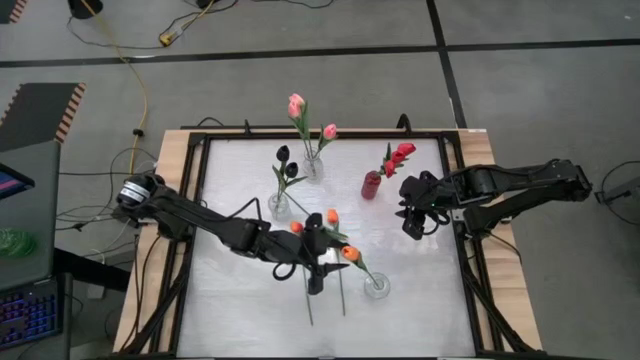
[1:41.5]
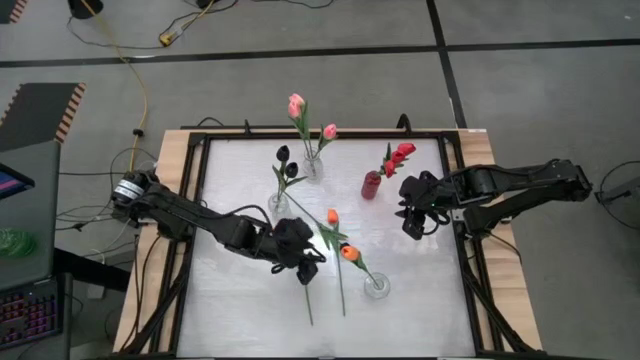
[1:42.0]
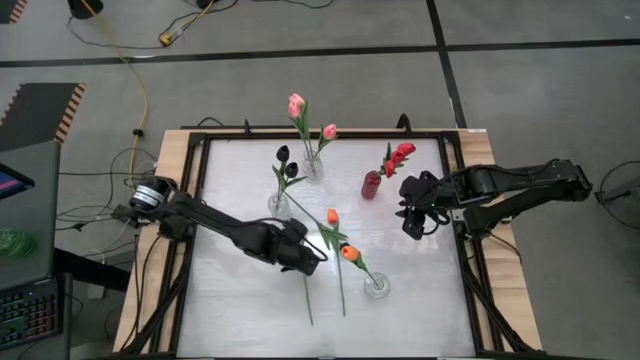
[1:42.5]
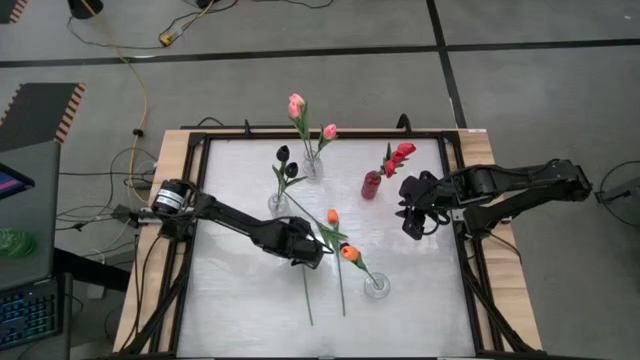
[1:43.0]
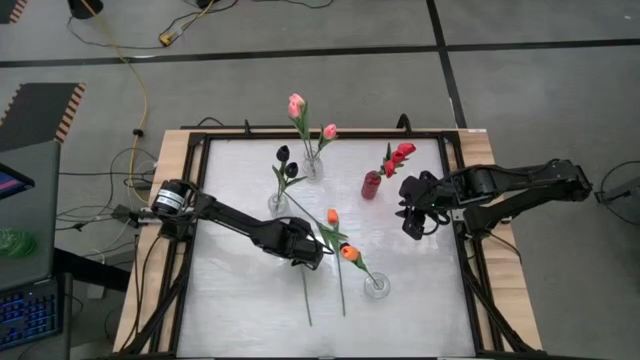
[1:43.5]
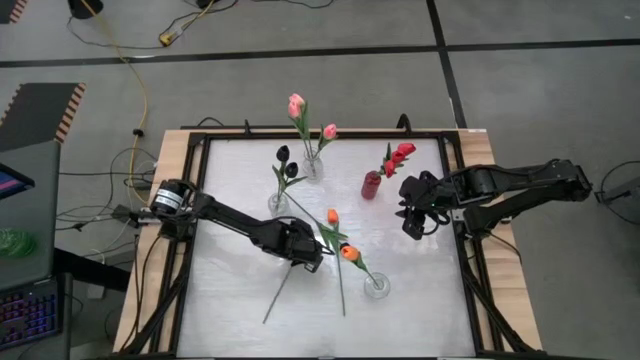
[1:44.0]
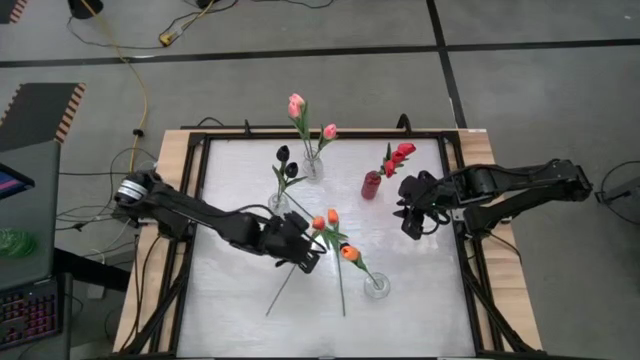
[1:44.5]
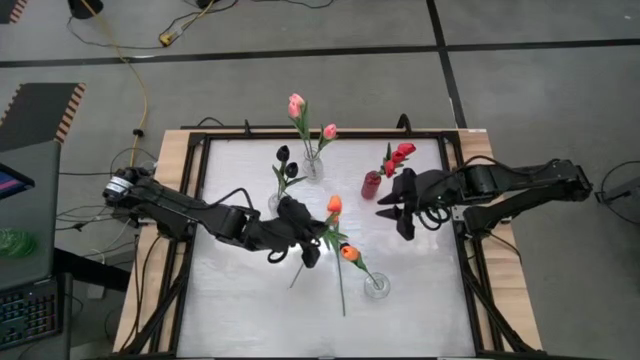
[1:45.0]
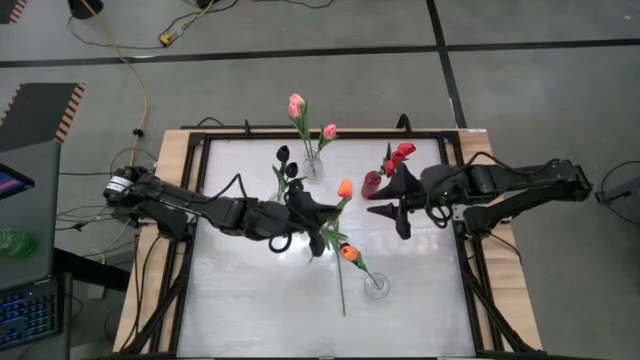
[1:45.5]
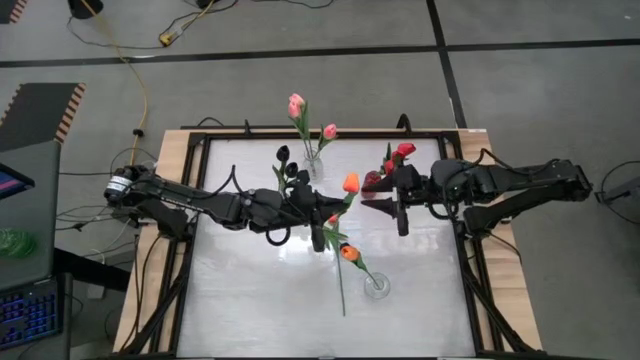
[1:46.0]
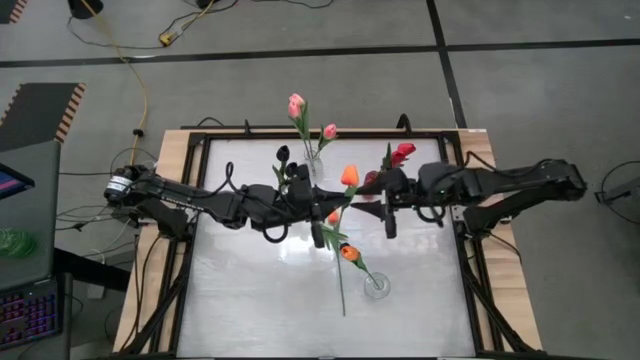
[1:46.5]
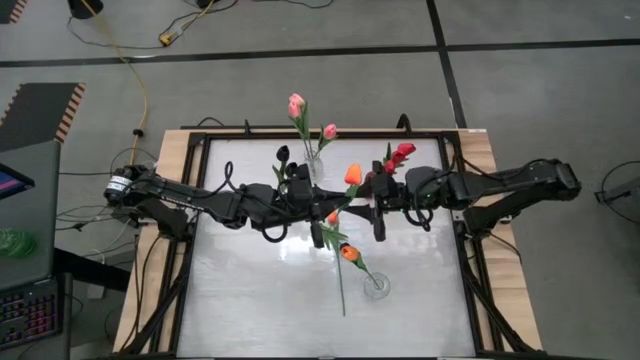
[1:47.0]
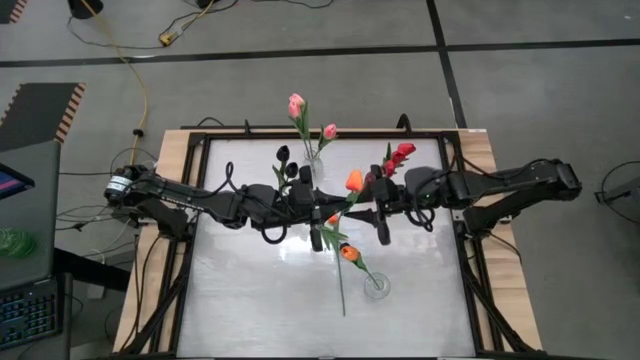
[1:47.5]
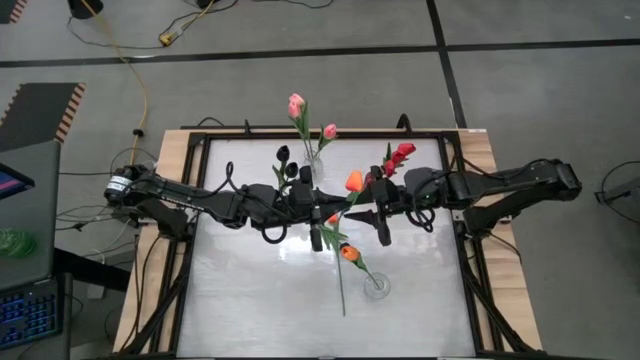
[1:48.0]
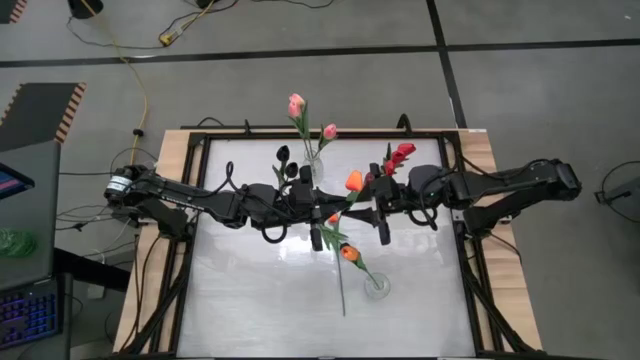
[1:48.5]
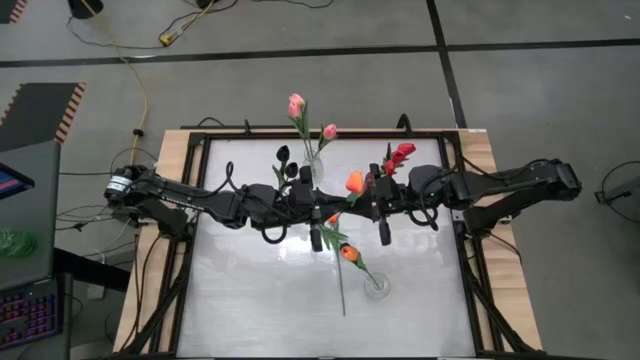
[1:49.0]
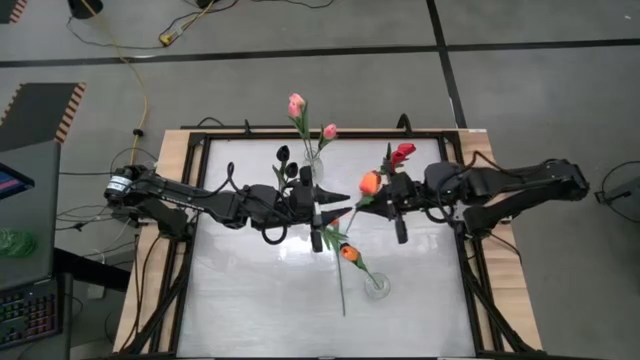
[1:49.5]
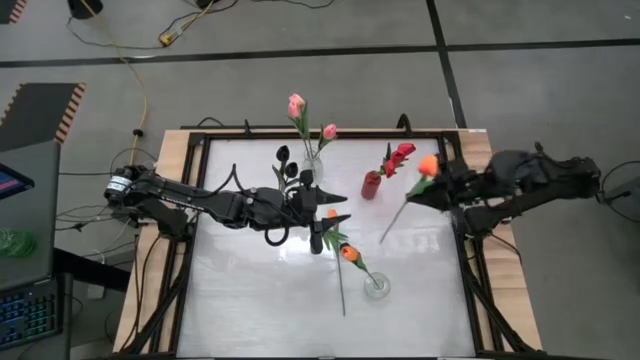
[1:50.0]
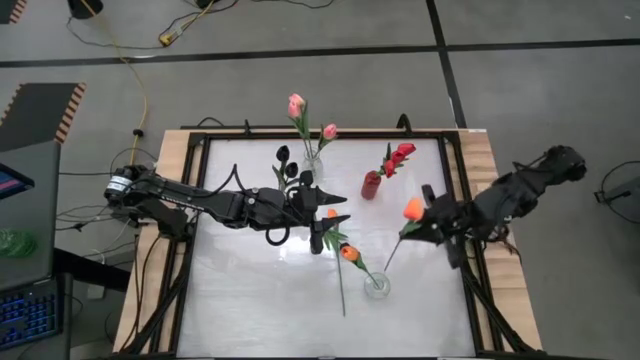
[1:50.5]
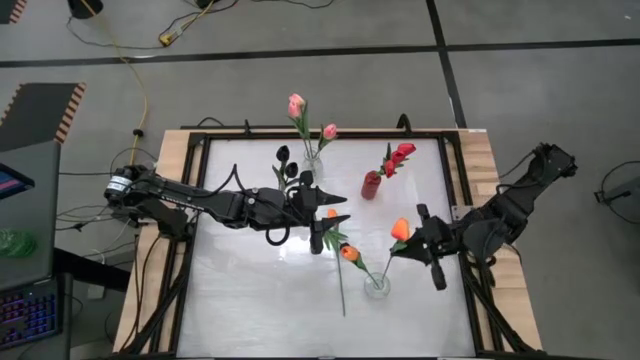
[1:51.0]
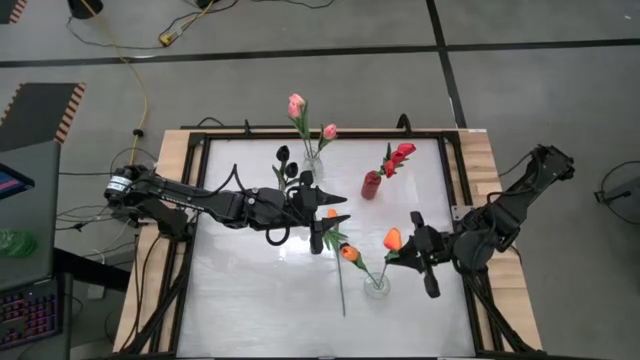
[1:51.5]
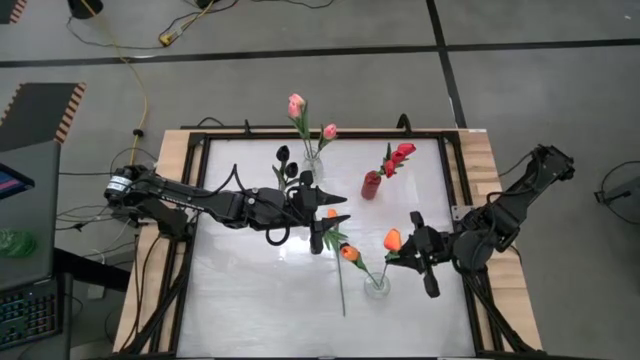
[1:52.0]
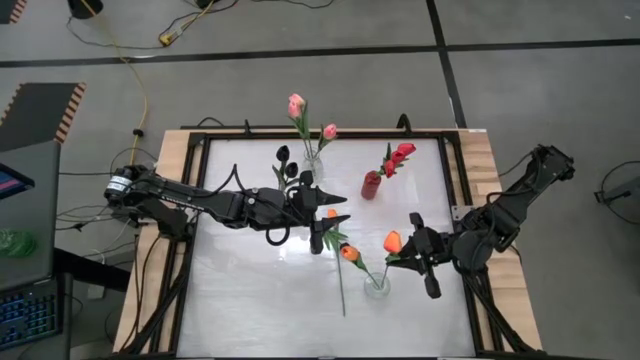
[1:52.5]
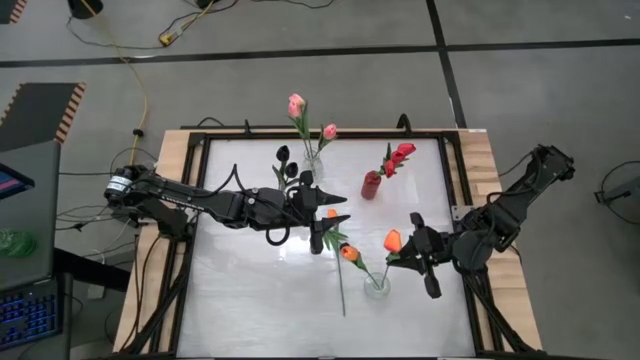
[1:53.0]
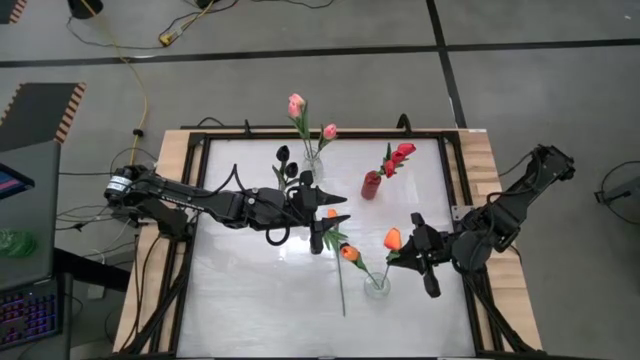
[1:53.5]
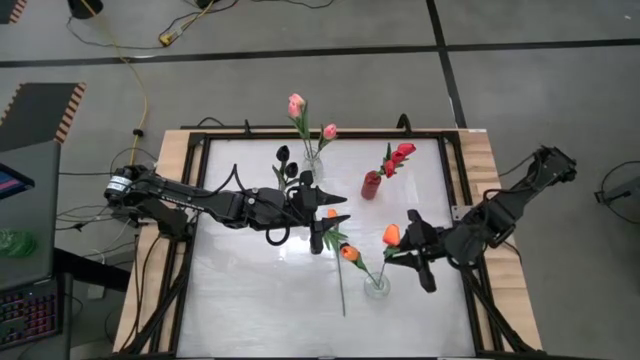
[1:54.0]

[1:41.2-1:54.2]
Task: Sort flowers into vase by color
Put the orange tulip into the bottom transparent vase

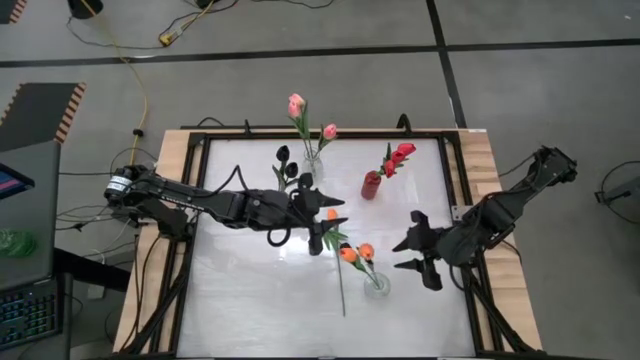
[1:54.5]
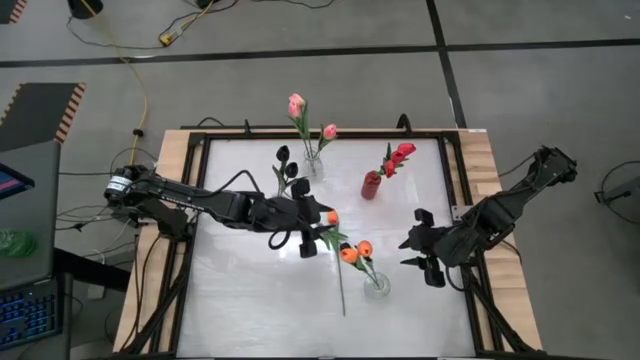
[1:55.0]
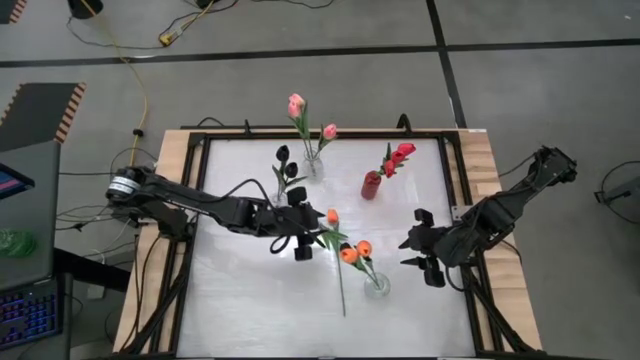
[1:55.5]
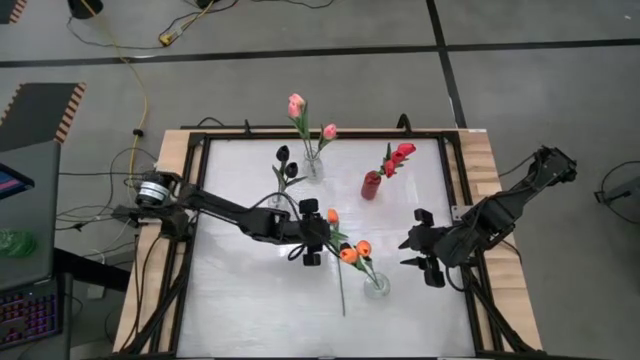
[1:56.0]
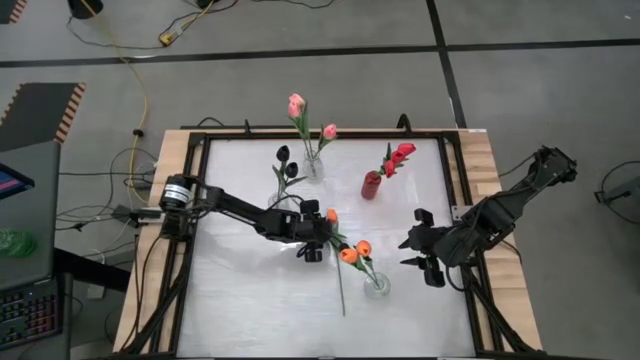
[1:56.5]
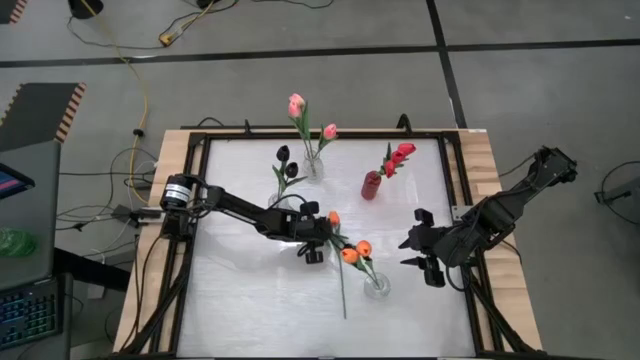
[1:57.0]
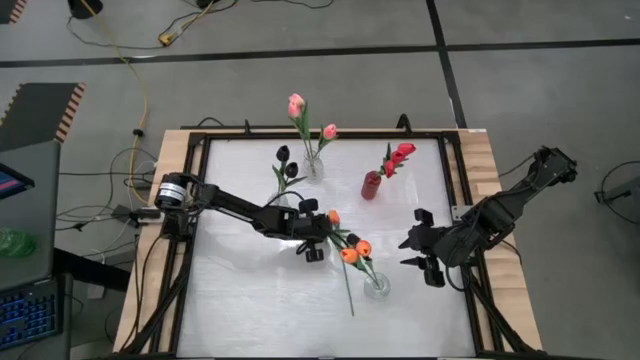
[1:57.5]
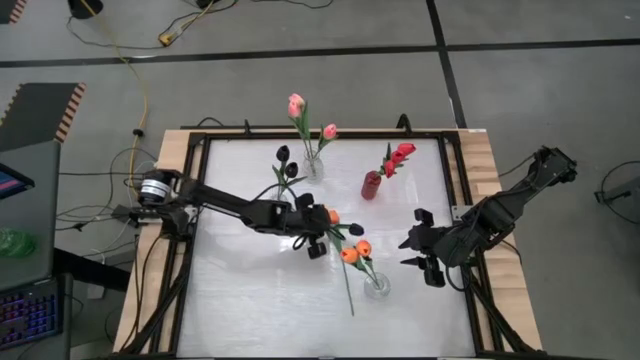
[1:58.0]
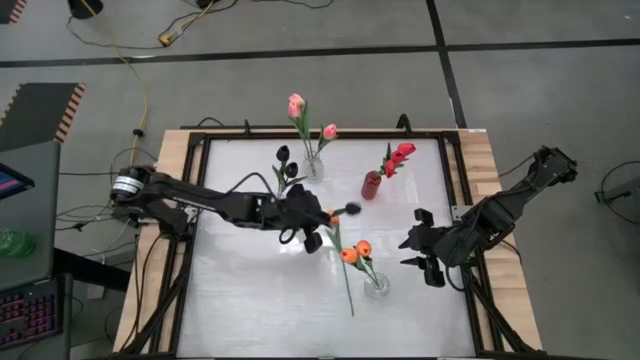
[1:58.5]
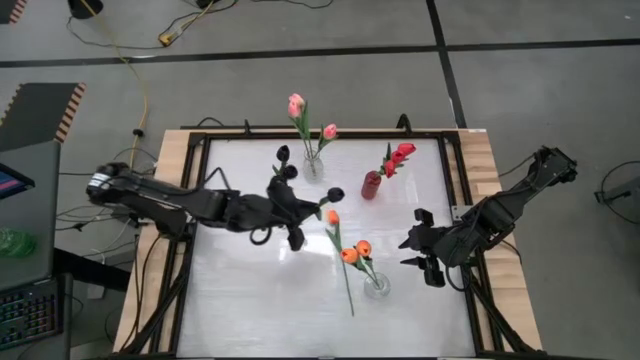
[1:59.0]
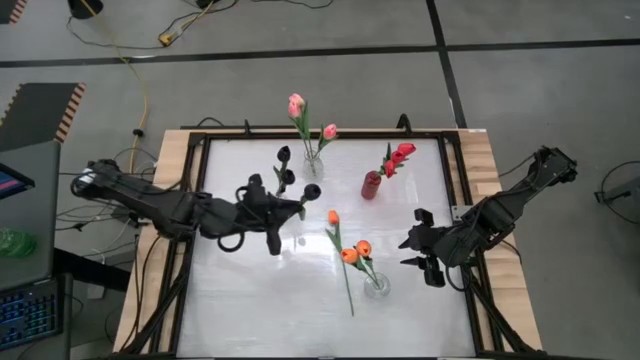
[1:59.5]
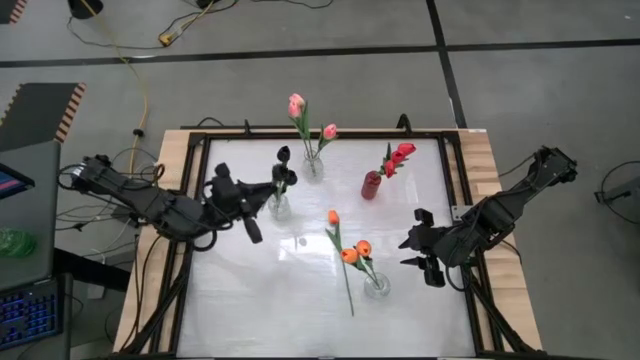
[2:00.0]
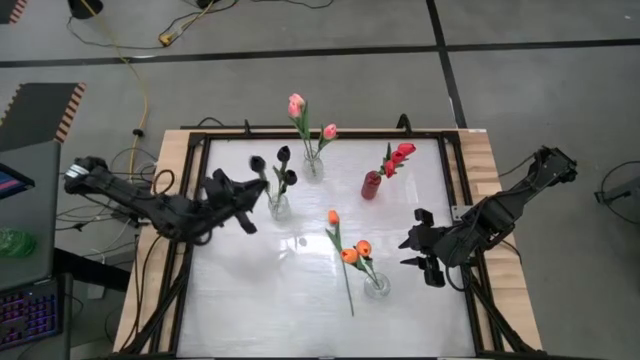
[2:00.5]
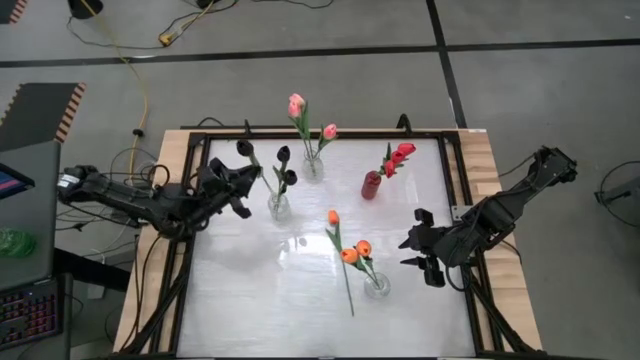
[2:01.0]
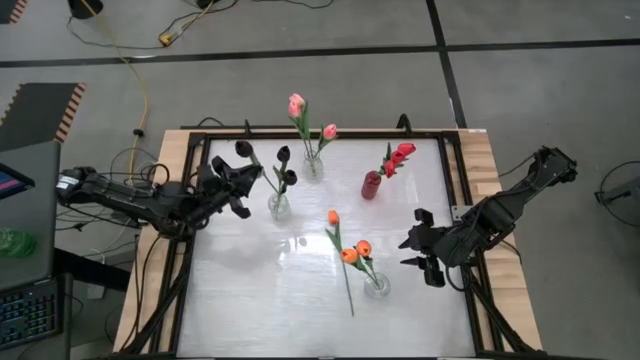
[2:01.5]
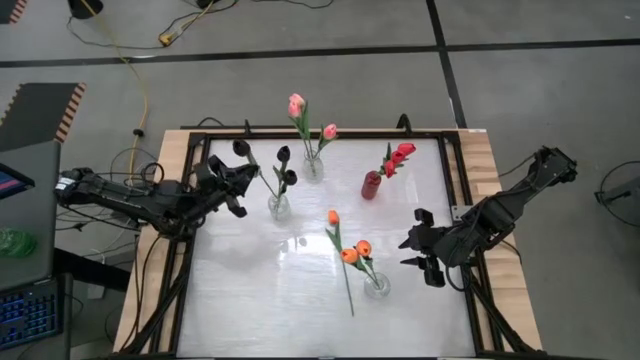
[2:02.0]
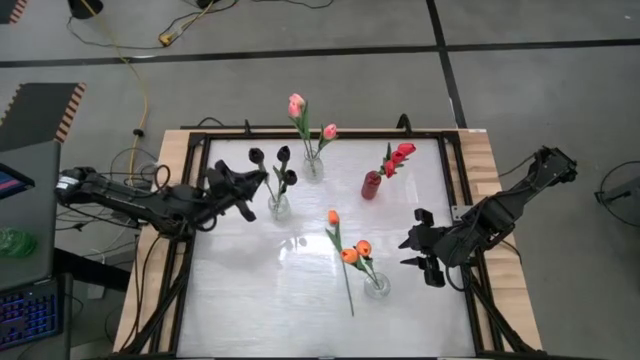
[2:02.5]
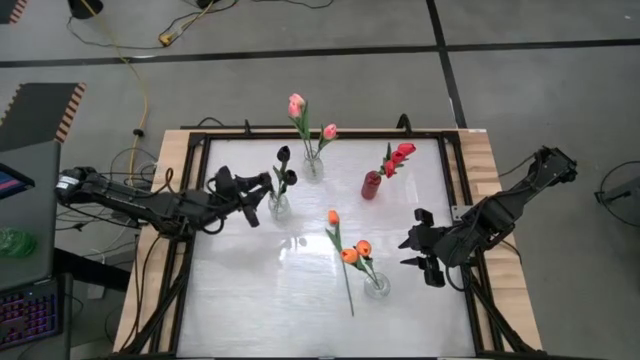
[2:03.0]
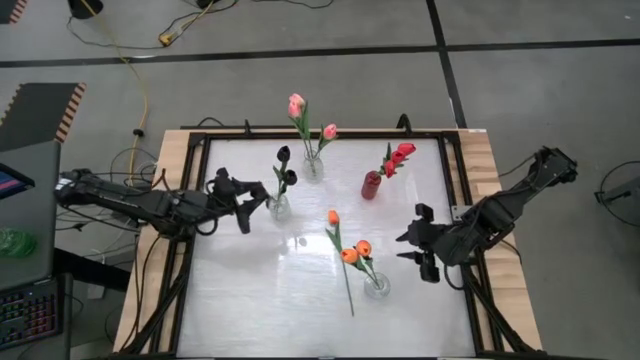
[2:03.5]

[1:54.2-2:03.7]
Put the black tulip into the middle transparent vase
